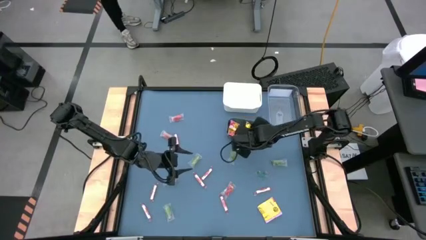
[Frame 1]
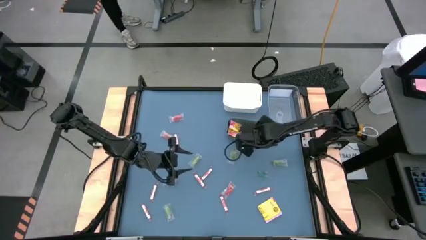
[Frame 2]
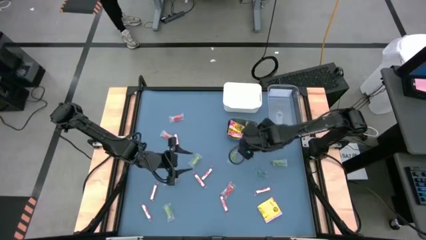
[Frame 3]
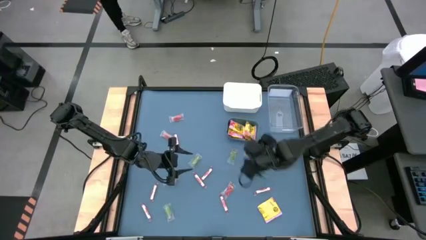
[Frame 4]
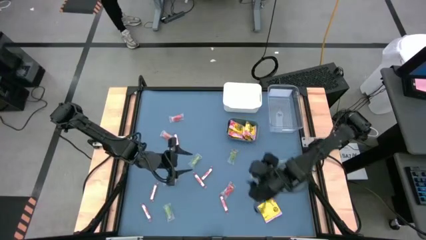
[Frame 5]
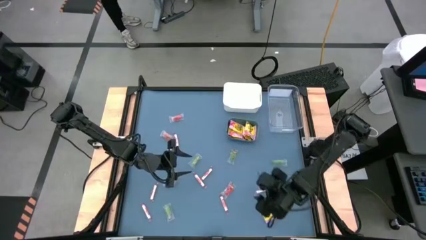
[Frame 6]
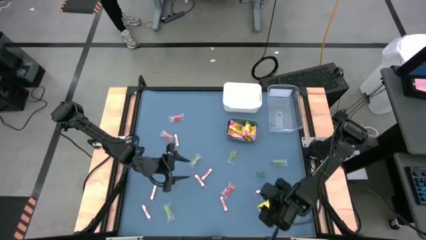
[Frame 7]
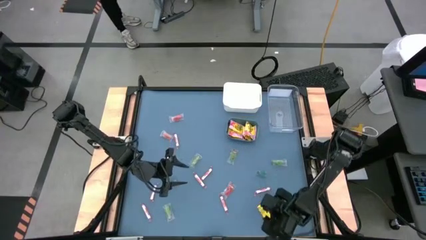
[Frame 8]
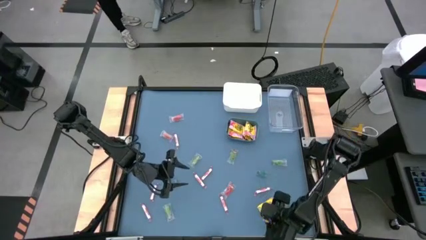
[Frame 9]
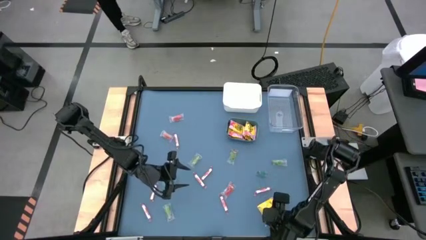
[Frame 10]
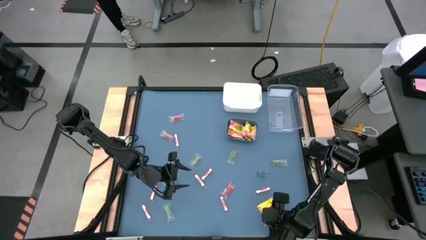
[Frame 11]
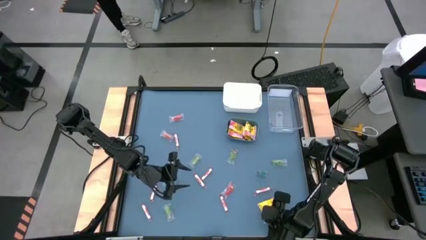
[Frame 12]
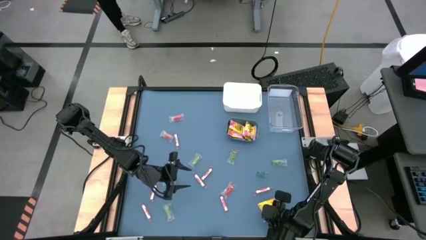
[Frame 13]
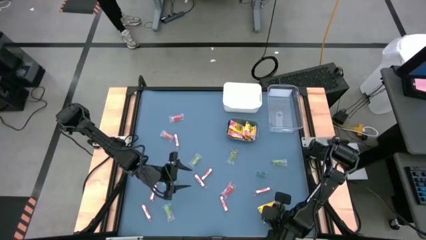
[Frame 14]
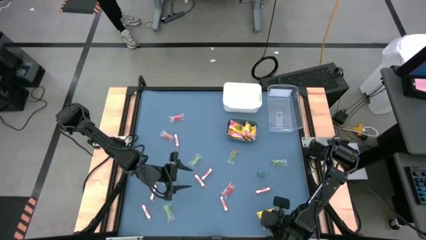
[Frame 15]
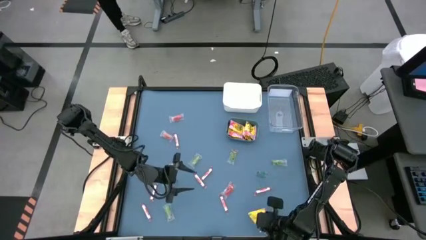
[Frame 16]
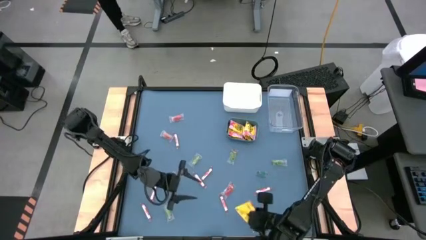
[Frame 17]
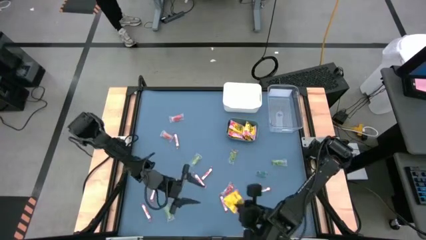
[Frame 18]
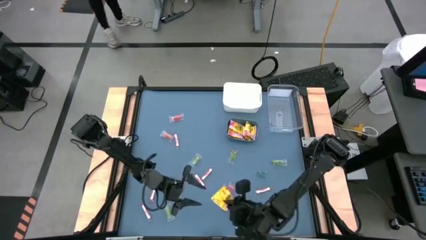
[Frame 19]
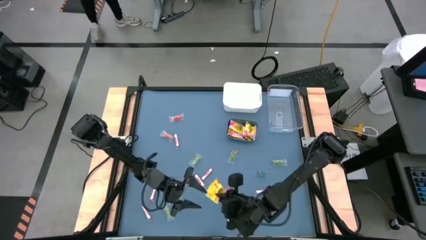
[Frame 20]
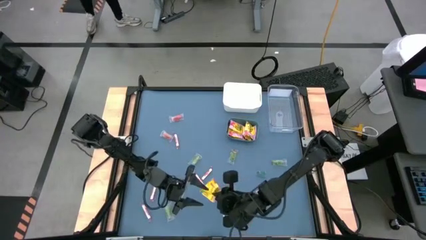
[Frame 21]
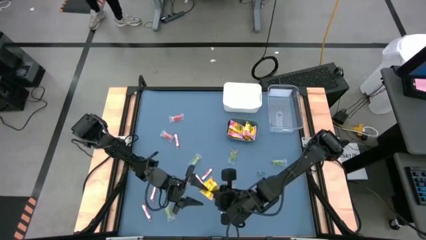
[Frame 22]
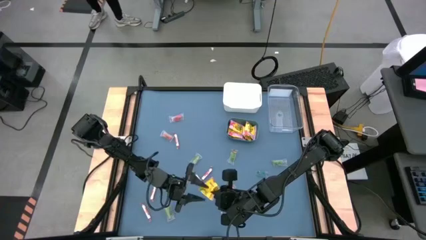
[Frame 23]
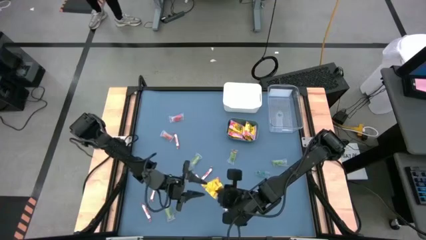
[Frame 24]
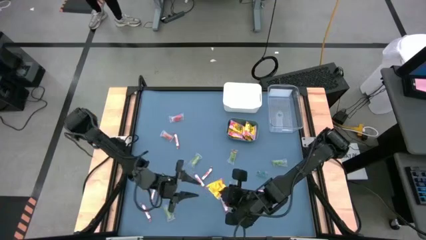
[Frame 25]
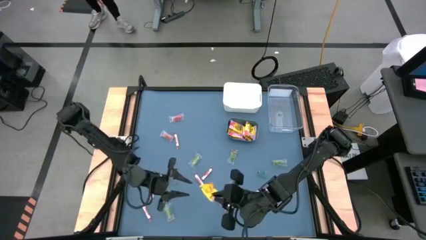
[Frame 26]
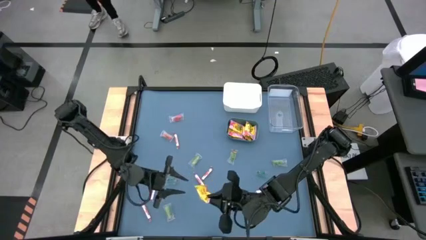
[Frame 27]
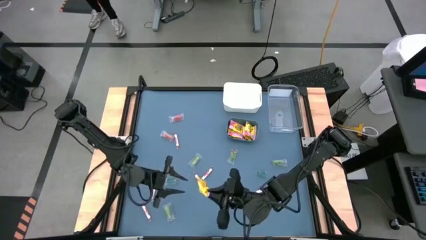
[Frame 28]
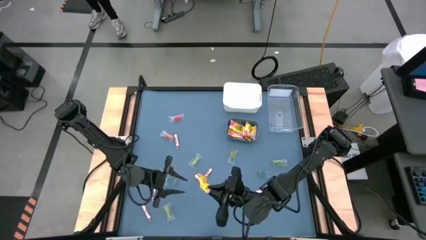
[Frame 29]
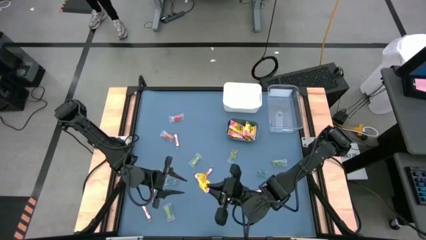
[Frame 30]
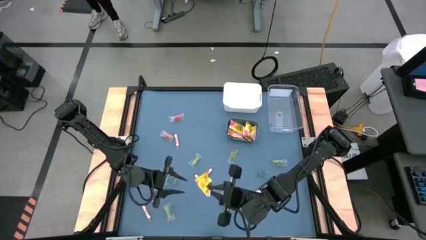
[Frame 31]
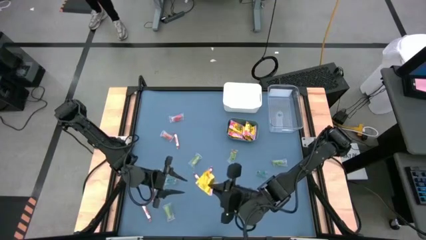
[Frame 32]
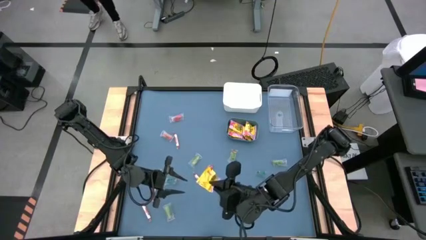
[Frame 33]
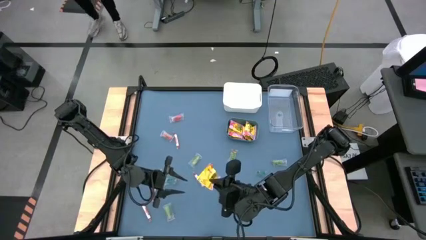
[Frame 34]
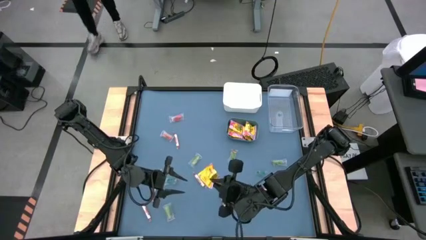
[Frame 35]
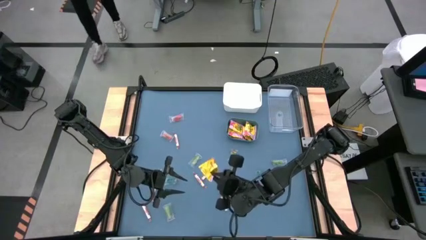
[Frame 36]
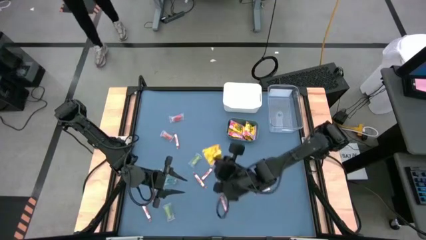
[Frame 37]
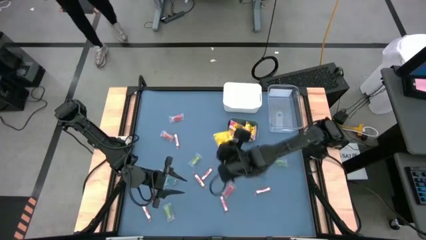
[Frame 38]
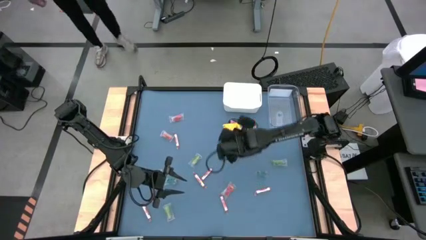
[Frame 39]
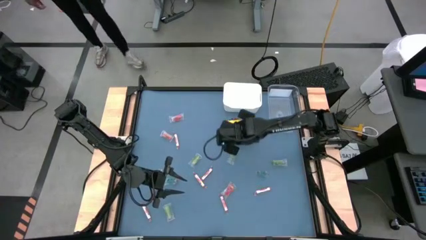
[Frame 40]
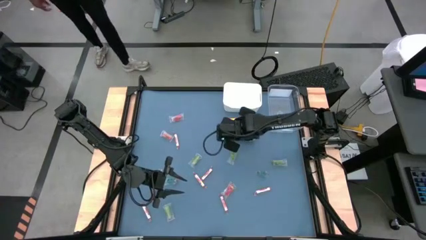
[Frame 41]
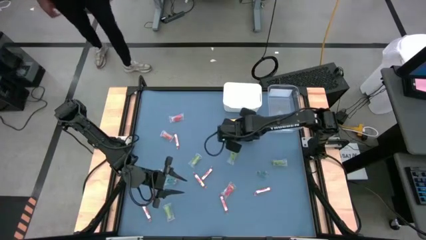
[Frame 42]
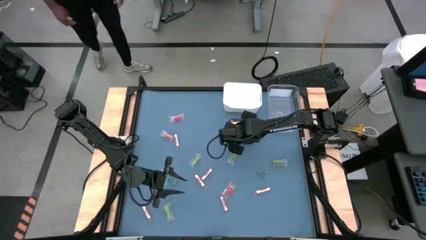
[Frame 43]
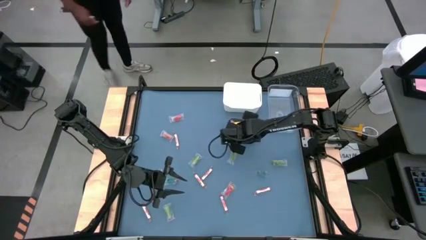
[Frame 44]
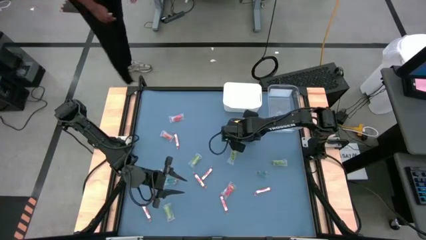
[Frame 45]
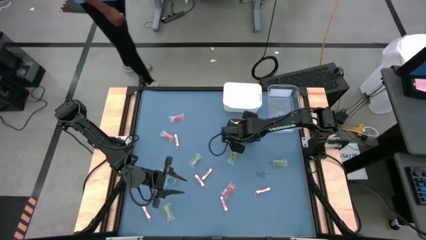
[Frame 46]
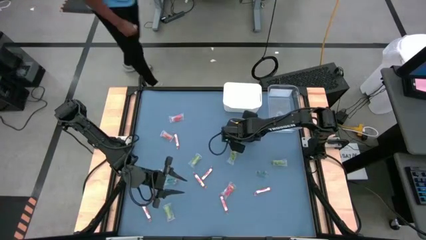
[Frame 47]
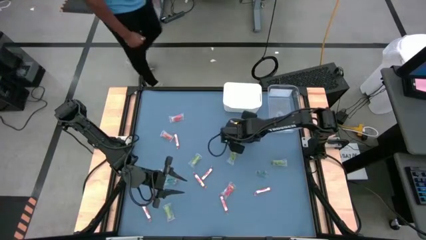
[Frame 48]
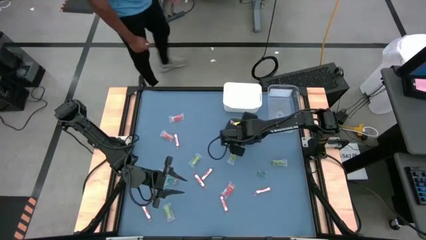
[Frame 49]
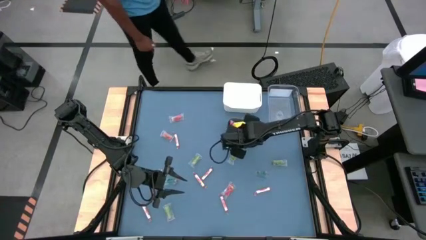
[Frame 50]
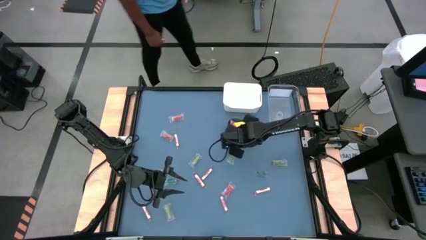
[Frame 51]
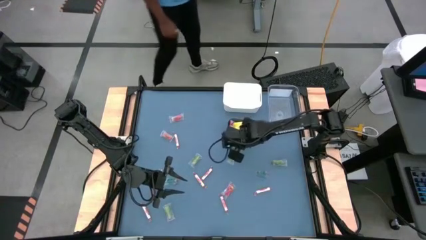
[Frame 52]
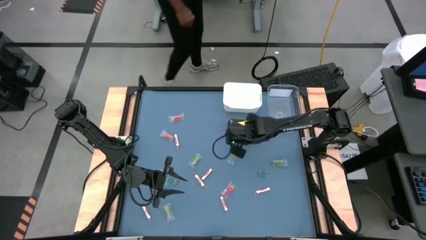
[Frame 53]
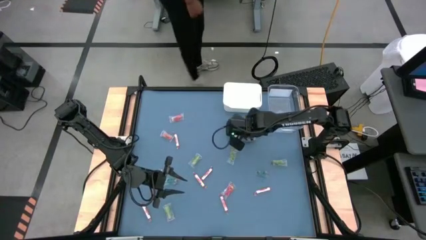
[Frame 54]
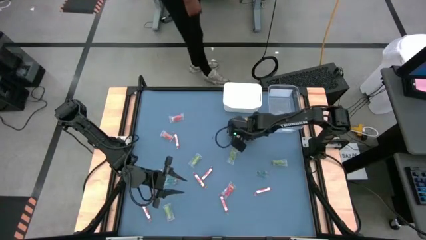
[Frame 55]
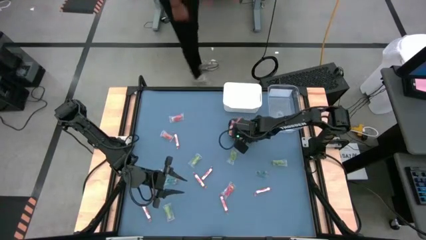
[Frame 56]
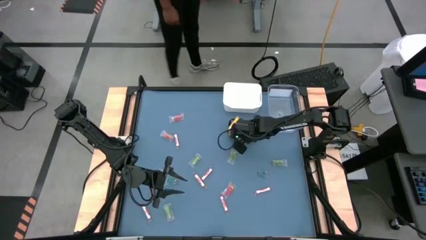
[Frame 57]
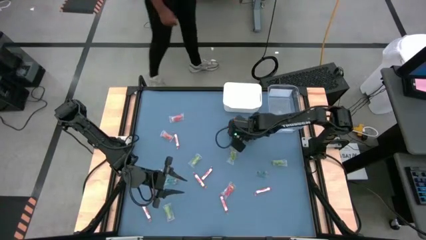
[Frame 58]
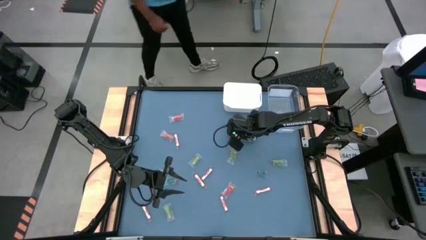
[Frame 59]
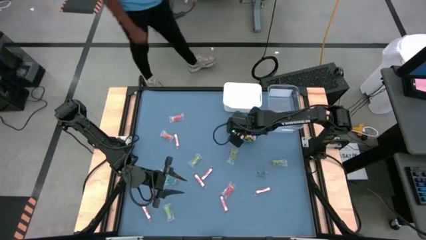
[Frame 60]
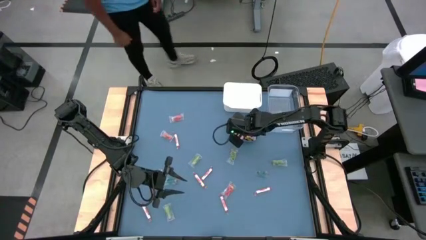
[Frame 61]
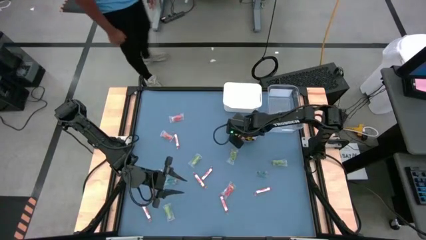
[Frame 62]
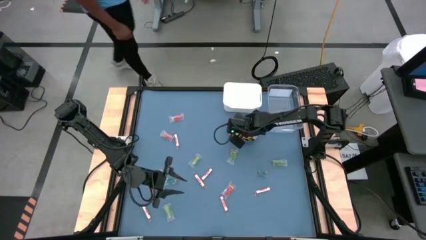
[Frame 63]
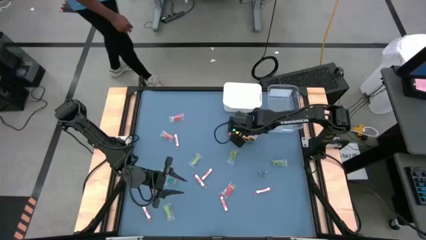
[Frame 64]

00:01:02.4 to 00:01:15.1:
Task: Sort candy
Put the yellow candy into the green bin

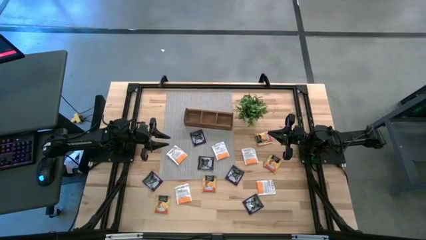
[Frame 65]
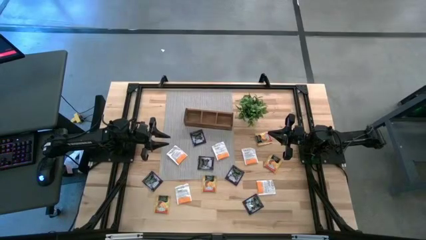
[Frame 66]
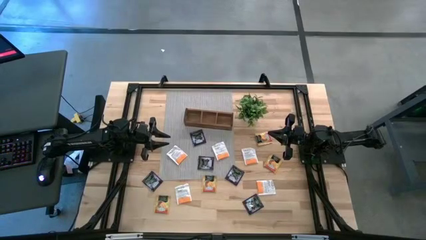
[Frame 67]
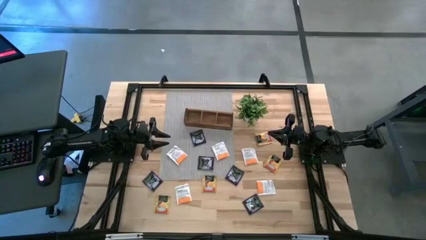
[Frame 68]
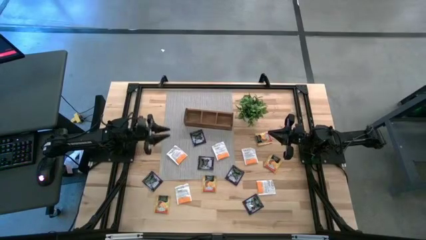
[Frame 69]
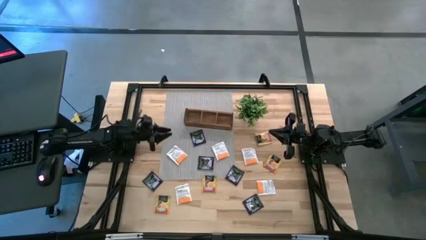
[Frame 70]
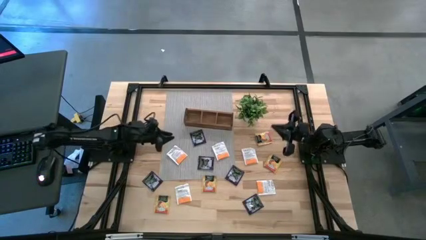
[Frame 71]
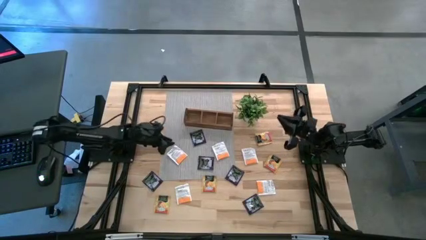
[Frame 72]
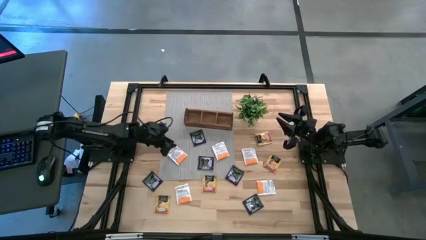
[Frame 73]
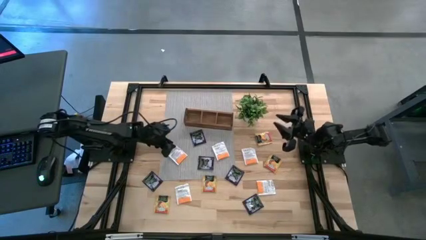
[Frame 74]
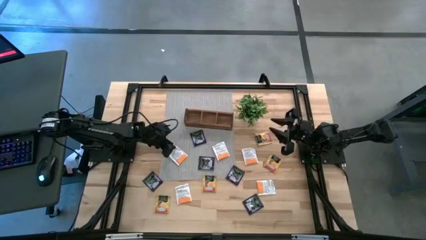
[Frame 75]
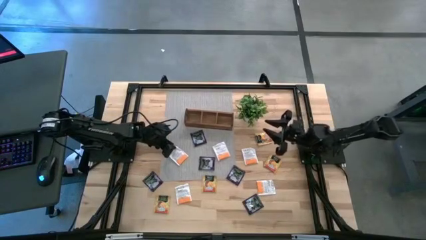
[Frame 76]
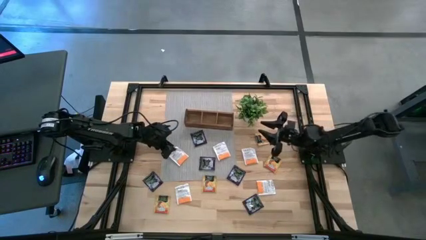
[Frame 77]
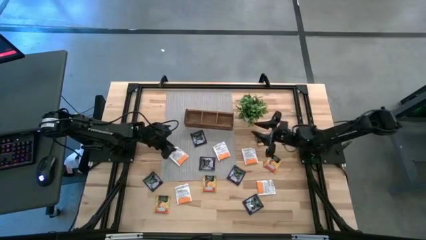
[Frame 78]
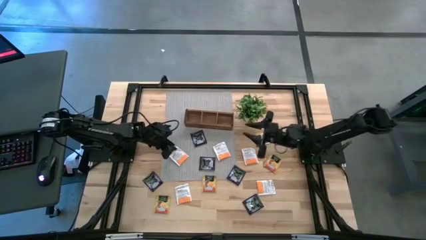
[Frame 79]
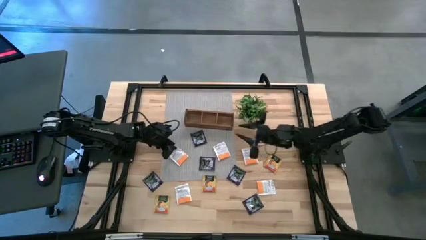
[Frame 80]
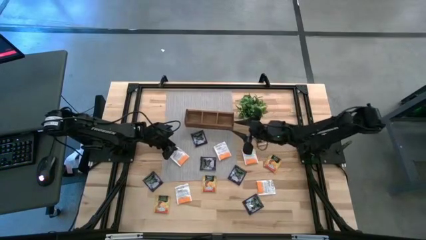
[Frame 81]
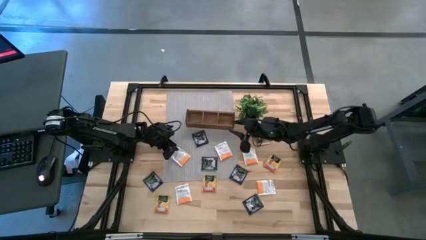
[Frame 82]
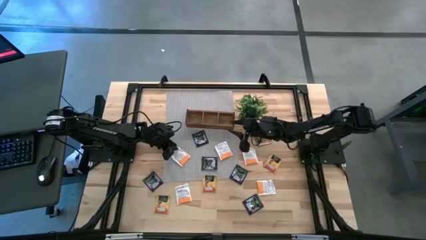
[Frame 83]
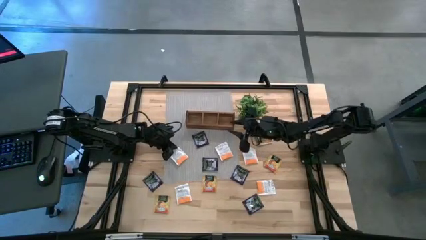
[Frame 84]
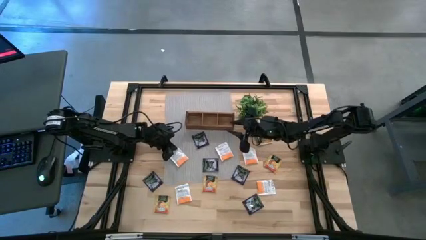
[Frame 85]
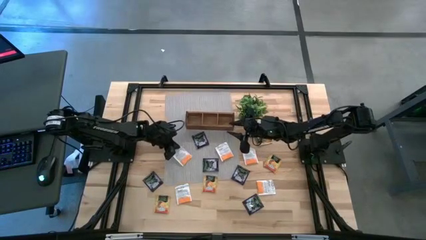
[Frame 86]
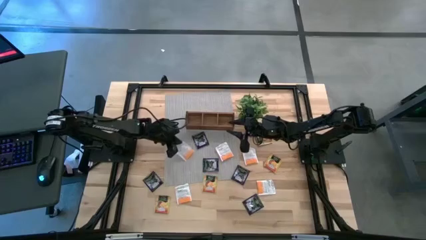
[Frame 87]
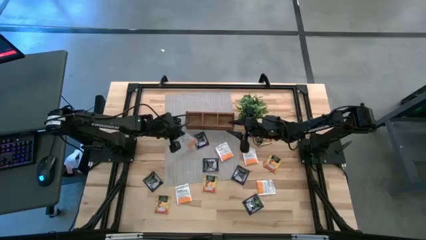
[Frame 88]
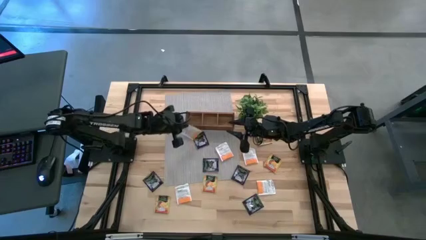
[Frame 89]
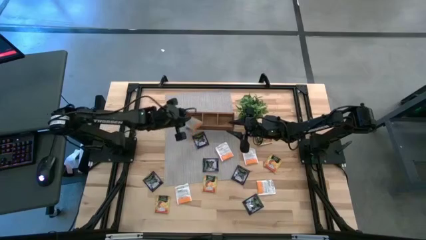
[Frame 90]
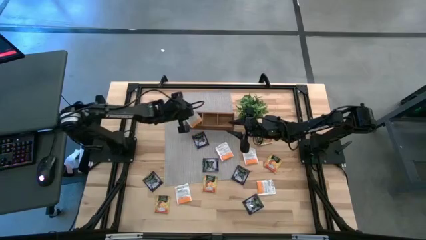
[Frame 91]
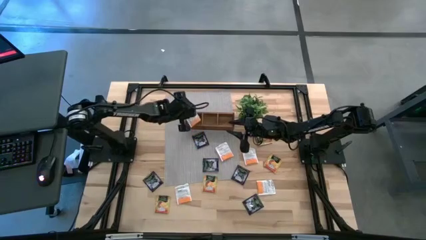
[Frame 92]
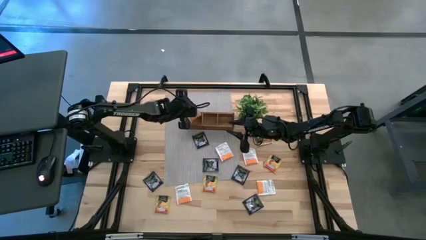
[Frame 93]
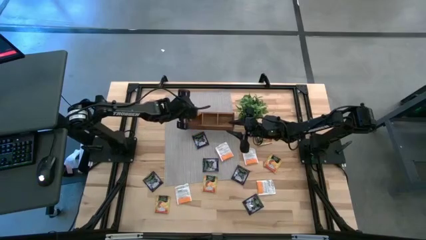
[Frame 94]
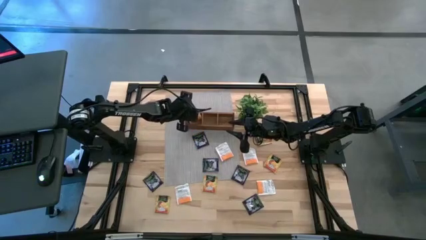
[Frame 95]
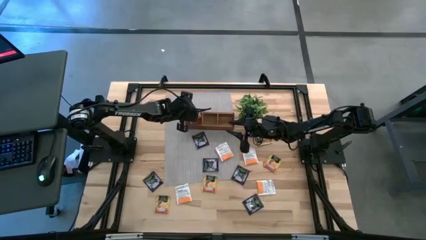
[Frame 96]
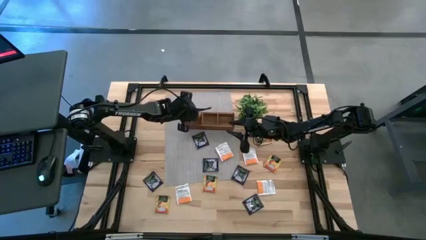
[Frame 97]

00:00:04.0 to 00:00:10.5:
Task: Pick & Place Tea
Put the white tea bag in the left section of the brown wooden organizer
